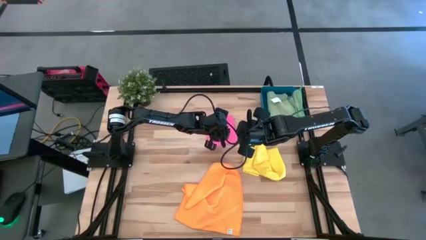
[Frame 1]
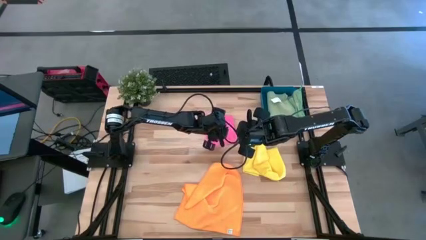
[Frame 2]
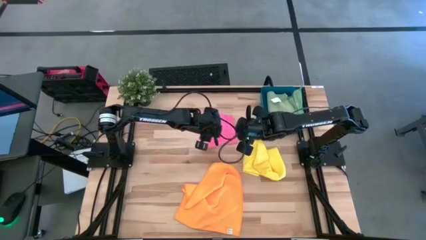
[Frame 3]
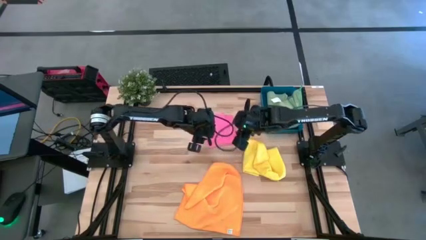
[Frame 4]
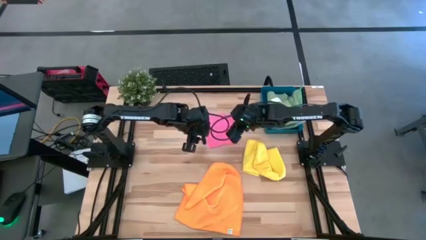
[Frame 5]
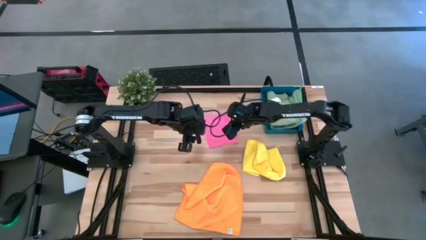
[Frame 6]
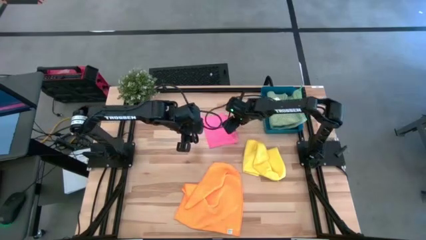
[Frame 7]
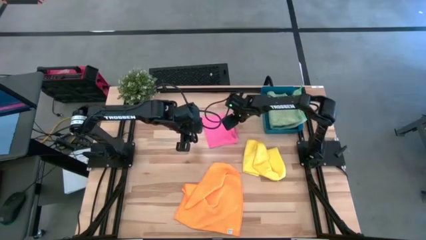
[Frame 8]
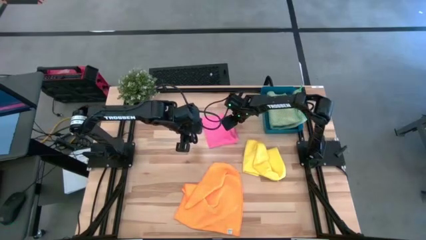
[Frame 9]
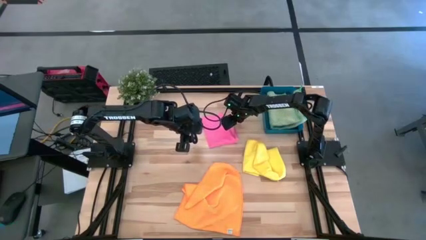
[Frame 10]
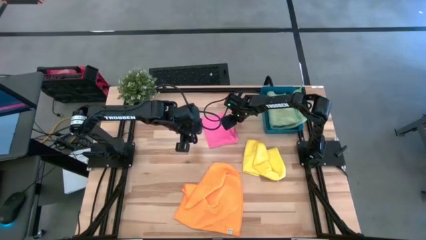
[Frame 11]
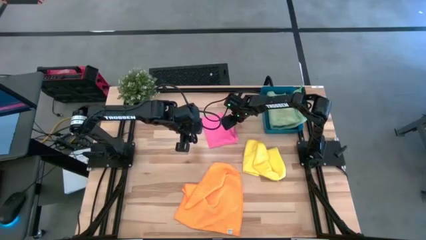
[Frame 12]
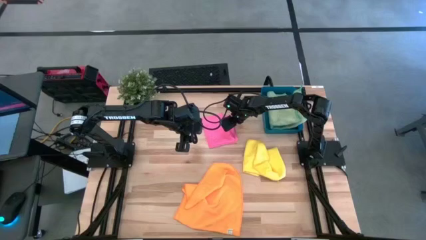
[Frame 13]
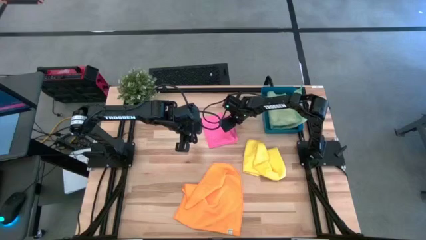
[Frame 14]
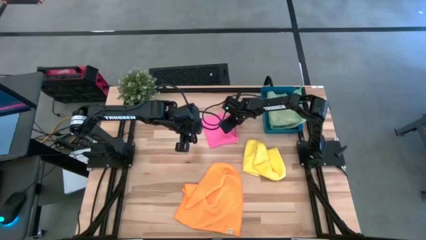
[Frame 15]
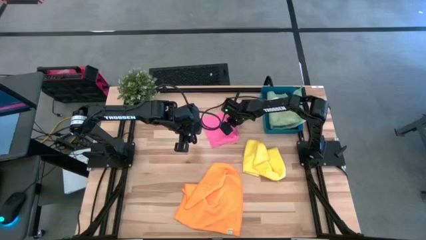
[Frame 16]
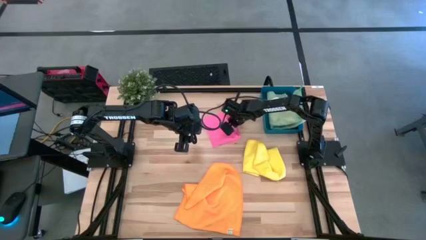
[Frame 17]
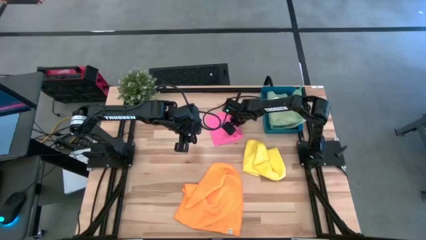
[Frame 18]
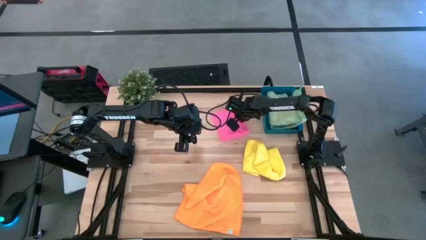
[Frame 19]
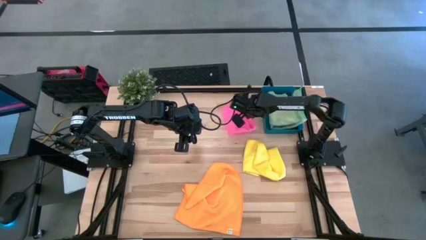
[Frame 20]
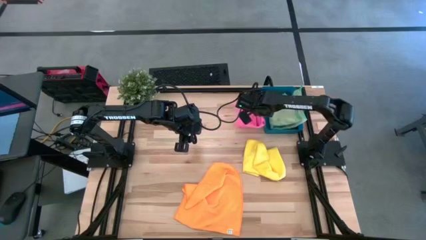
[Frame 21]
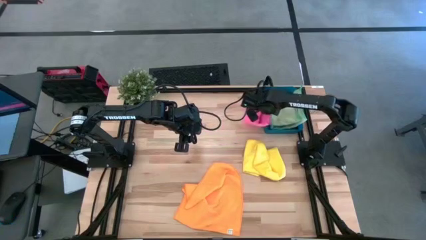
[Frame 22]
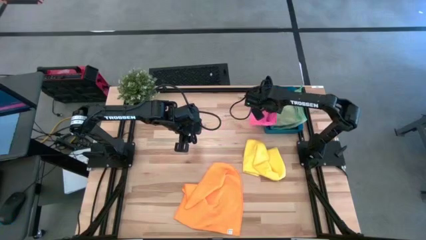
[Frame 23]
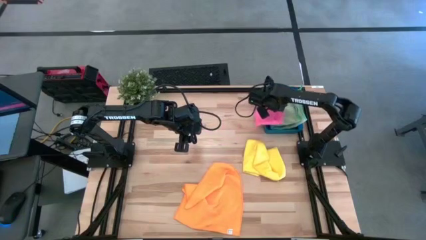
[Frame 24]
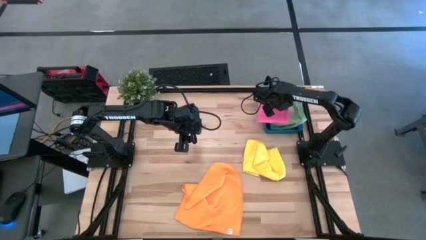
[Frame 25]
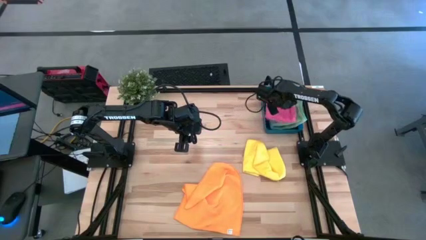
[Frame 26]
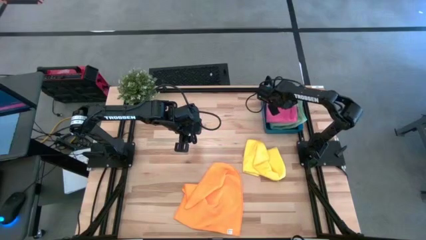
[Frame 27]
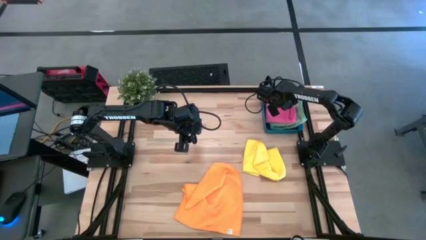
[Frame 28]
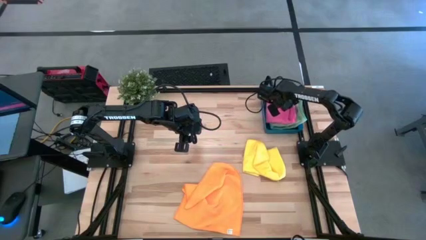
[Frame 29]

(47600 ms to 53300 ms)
Task: Fold microfiber towels
Put the pink folded microfiber towel into the bin

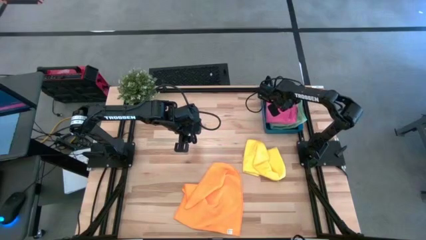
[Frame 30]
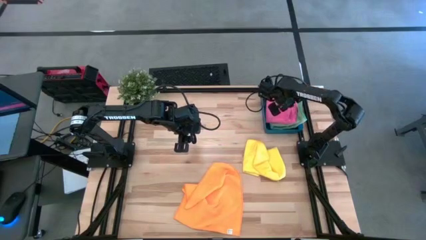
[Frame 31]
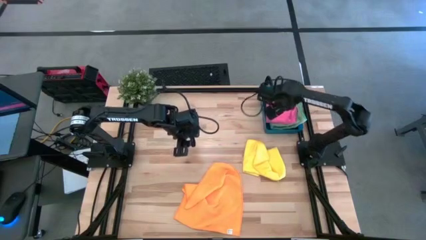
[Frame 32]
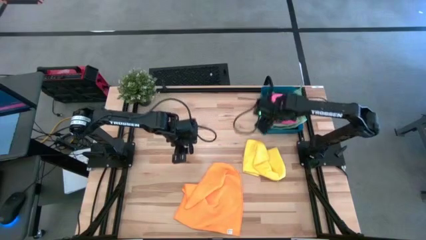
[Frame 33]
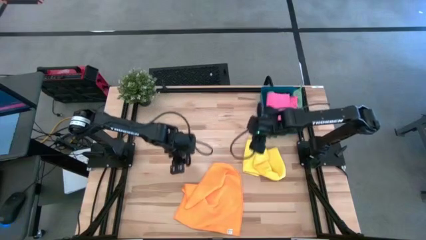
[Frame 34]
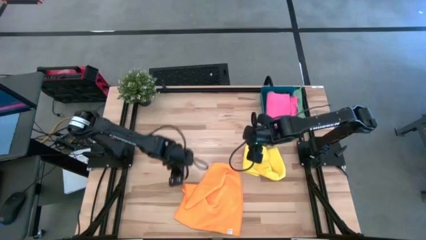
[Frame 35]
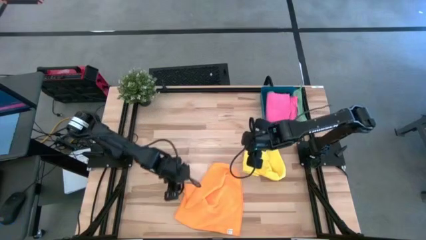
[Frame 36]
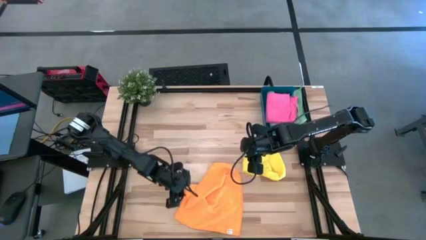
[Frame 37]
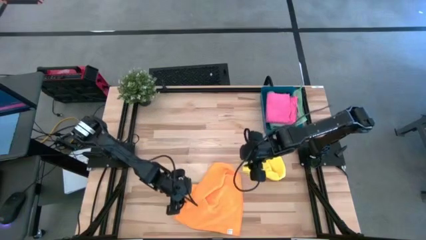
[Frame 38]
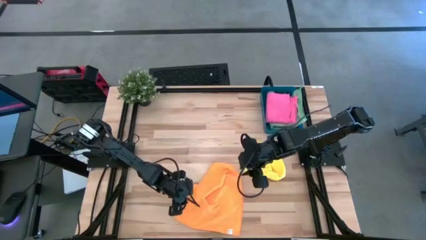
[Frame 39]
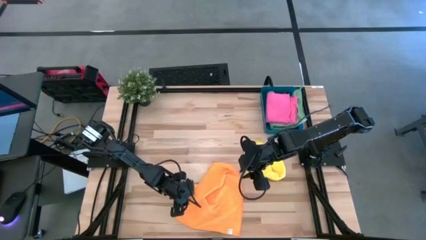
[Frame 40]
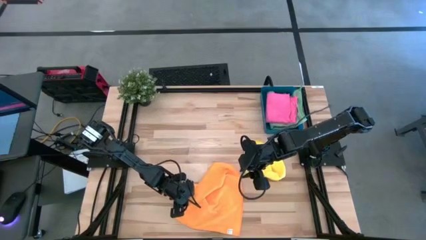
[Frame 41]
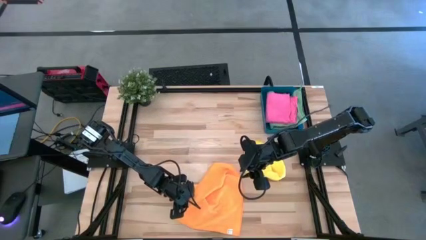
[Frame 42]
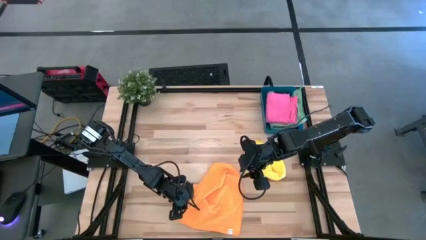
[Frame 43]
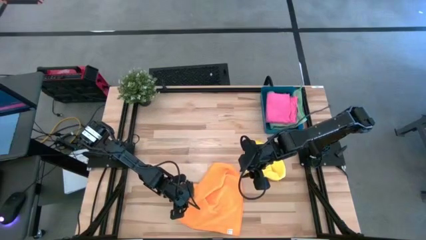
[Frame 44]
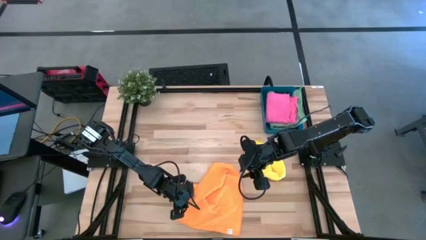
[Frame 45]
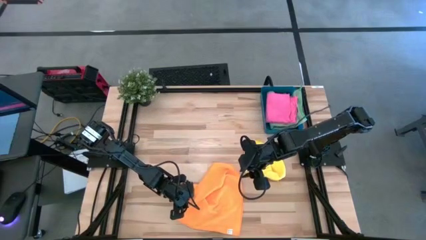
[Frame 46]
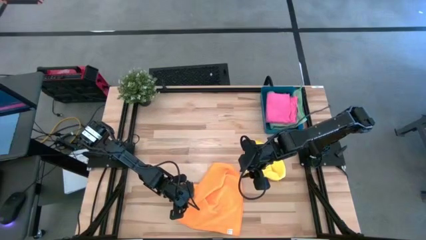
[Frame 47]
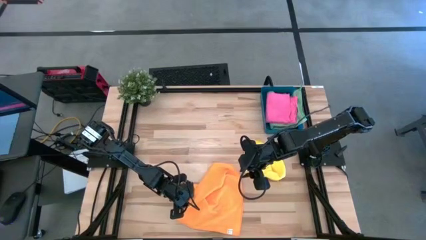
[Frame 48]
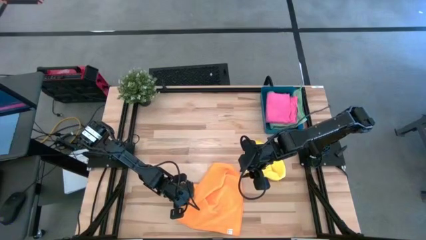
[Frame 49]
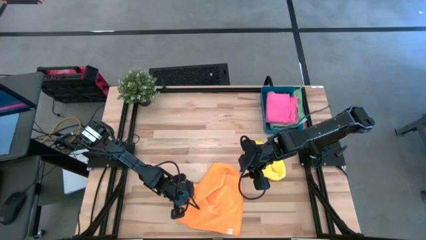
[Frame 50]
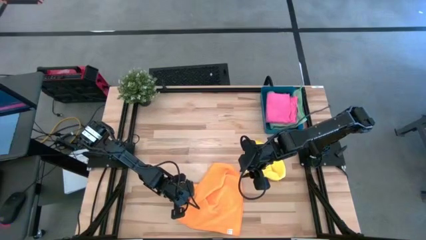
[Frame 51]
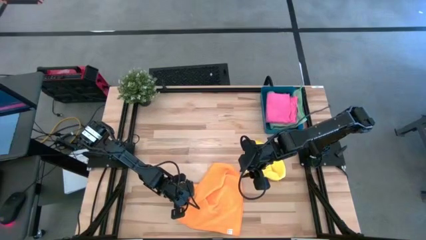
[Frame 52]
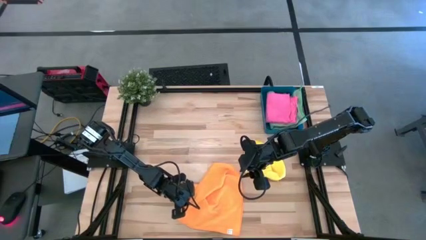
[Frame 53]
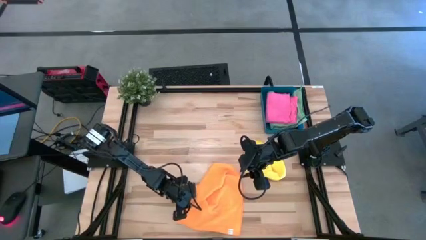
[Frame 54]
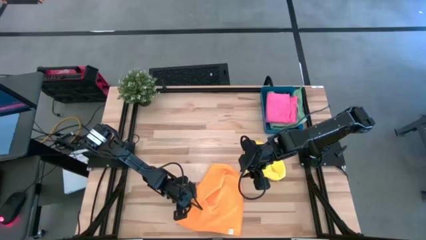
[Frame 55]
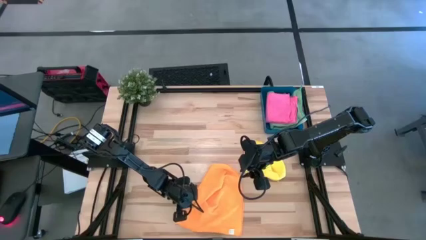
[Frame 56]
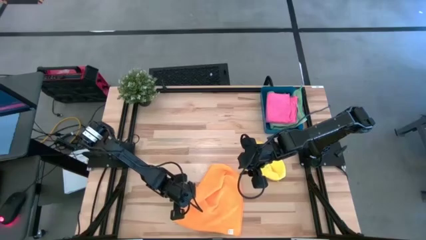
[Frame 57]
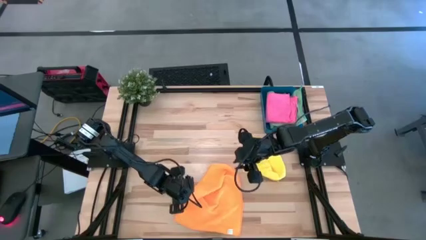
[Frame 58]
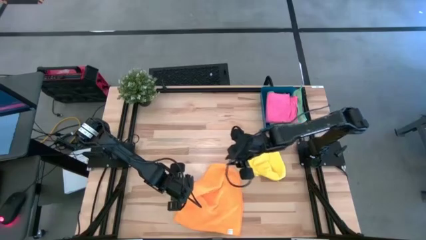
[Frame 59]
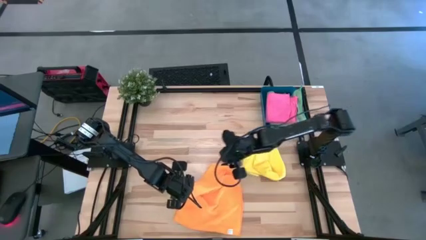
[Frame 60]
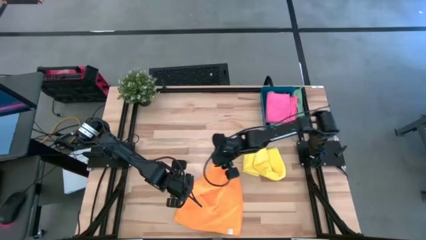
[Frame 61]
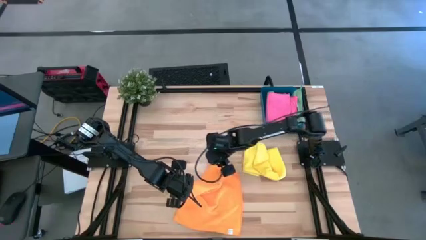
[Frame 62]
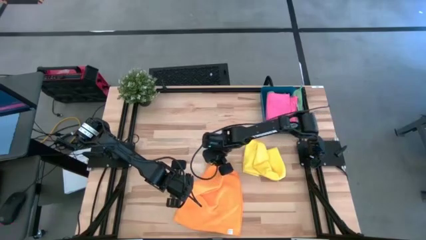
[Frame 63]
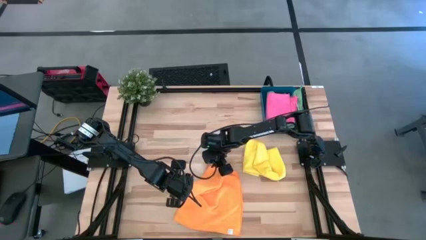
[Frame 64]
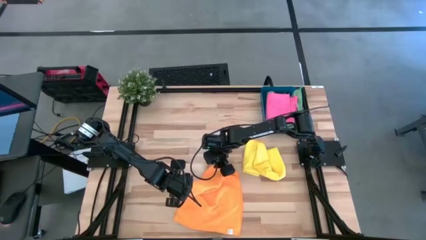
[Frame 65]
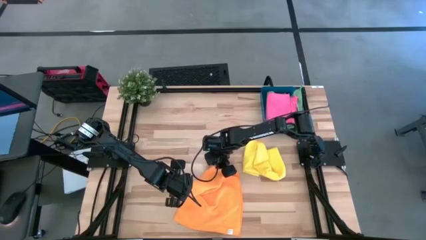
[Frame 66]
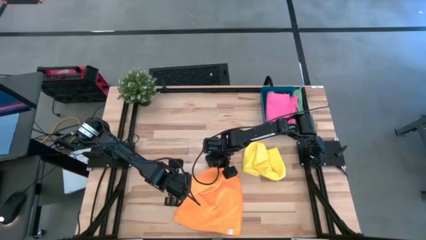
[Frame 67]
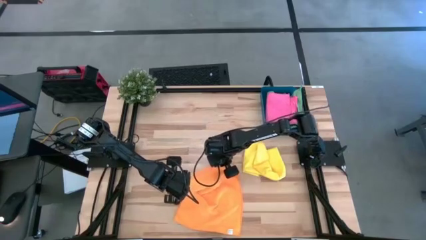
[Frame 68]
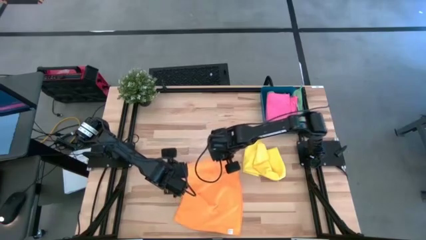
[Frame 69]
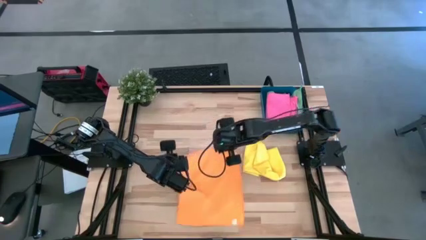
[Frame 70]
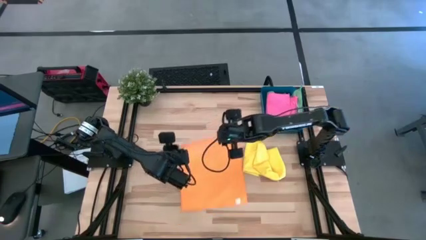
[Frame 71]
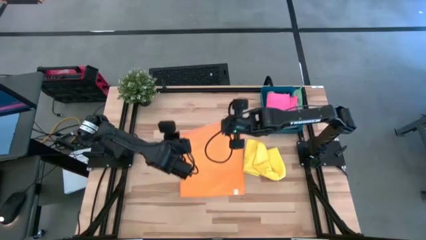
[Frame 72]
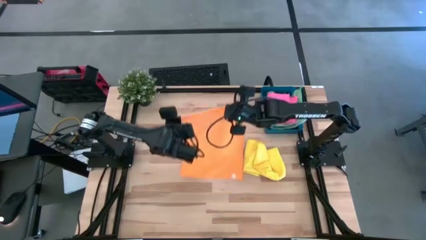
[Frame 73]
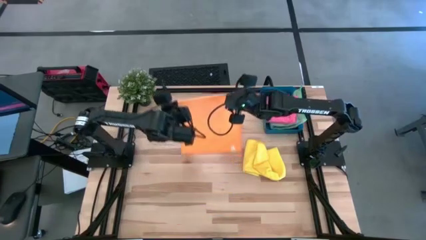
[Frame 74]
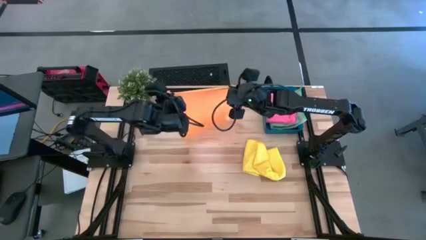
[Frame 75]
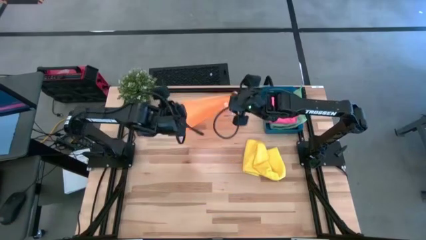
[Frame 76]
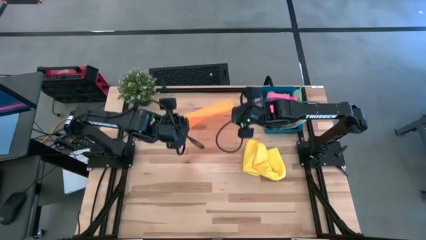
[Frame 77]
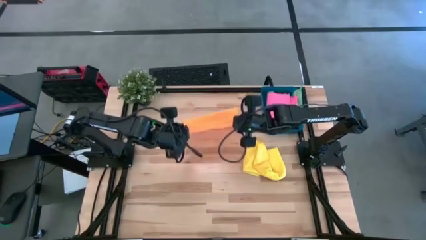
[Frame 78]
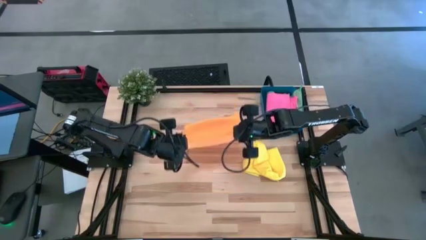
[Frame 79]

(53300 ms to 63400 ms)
Fold the orange microfiber towel on the table
